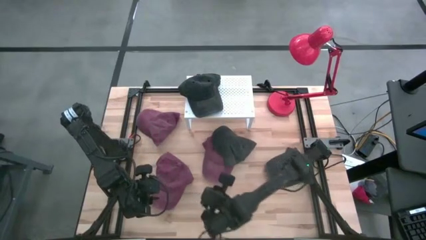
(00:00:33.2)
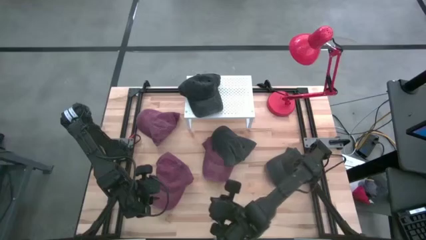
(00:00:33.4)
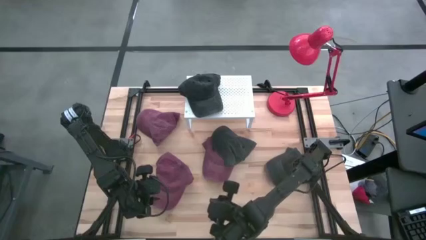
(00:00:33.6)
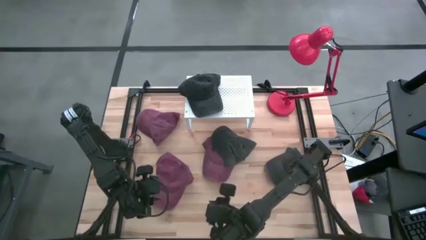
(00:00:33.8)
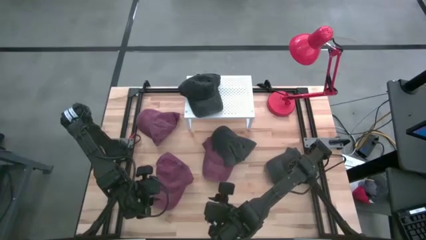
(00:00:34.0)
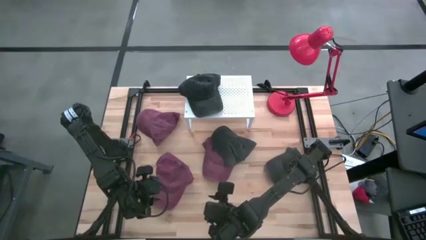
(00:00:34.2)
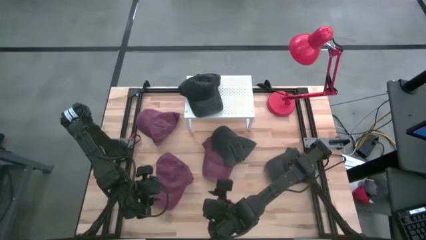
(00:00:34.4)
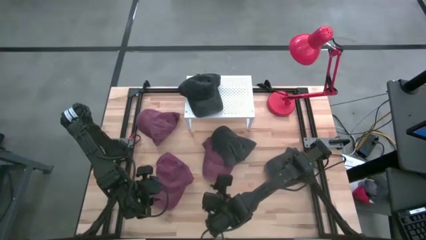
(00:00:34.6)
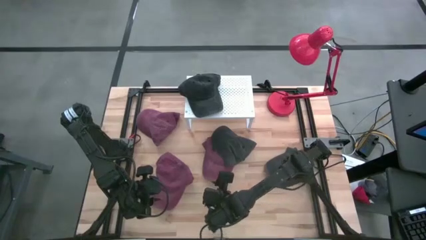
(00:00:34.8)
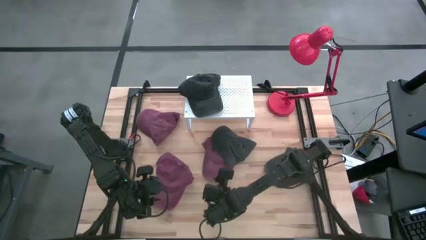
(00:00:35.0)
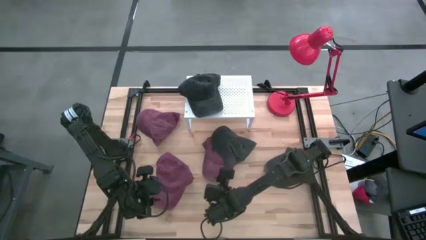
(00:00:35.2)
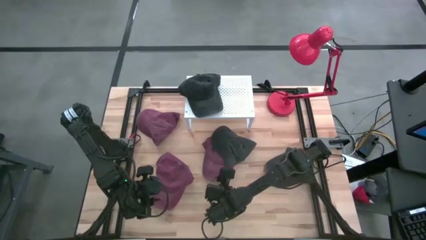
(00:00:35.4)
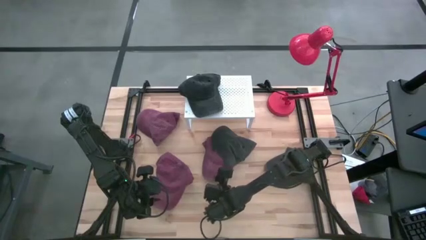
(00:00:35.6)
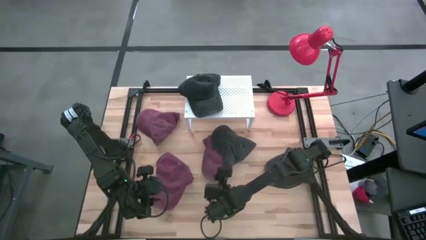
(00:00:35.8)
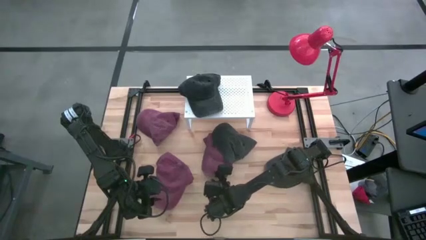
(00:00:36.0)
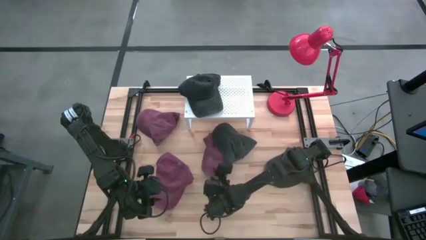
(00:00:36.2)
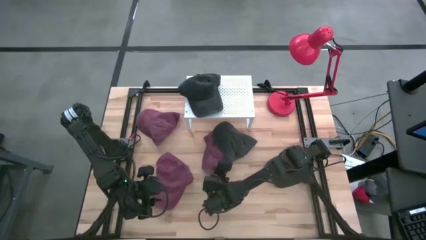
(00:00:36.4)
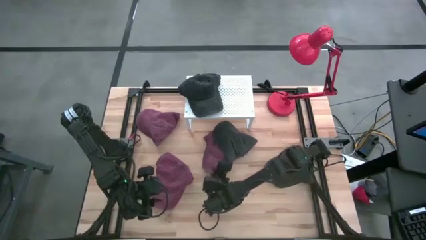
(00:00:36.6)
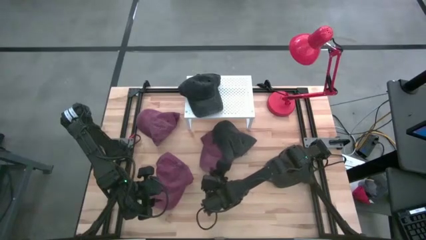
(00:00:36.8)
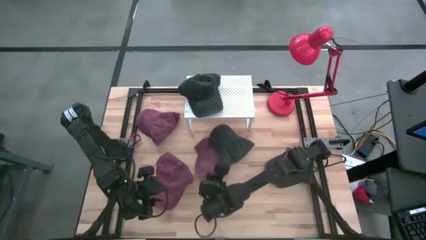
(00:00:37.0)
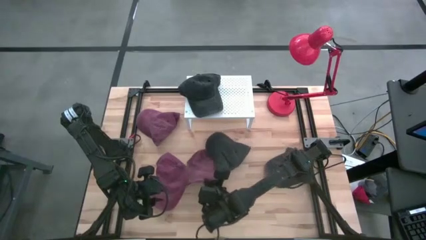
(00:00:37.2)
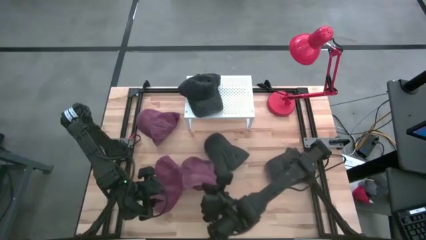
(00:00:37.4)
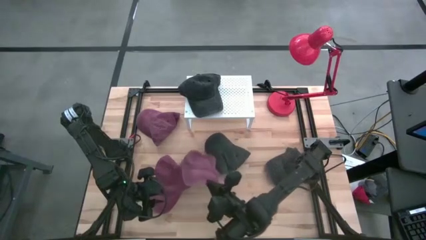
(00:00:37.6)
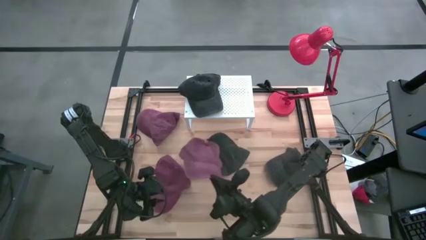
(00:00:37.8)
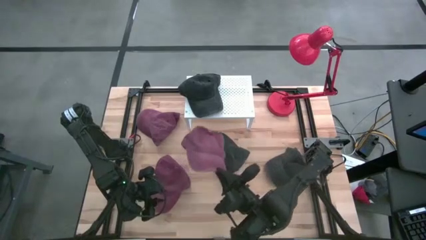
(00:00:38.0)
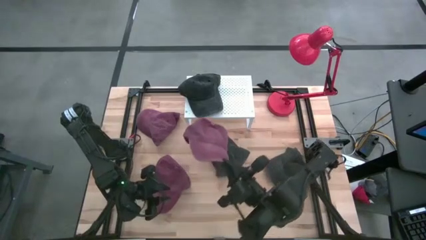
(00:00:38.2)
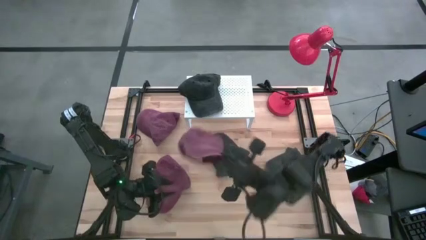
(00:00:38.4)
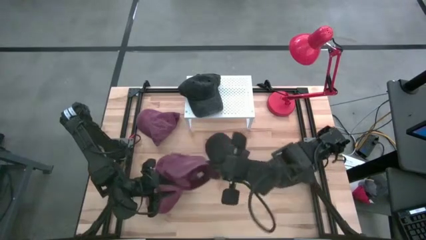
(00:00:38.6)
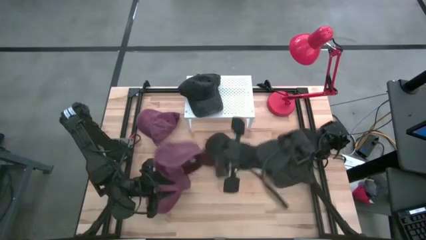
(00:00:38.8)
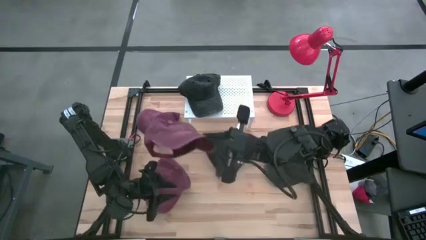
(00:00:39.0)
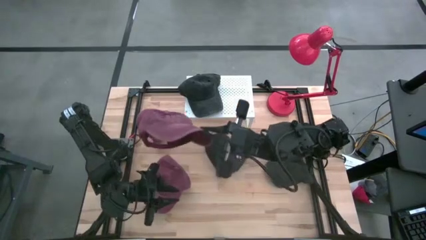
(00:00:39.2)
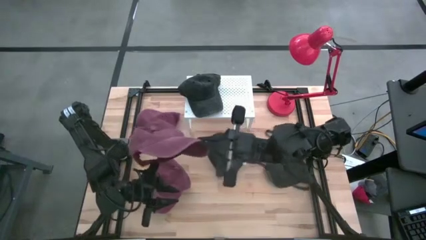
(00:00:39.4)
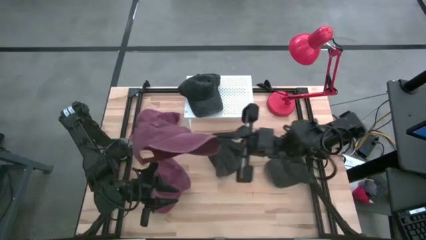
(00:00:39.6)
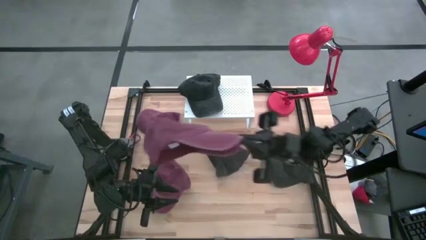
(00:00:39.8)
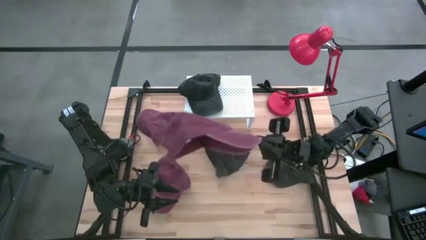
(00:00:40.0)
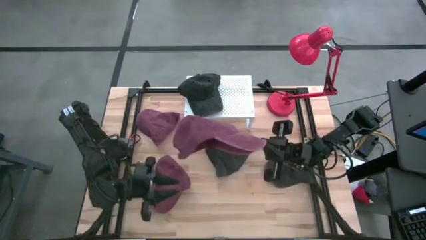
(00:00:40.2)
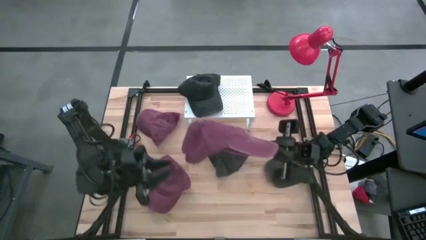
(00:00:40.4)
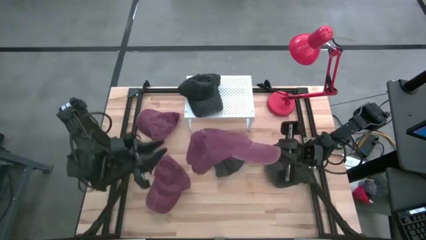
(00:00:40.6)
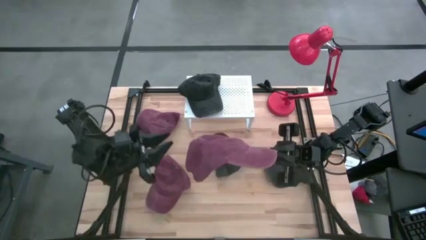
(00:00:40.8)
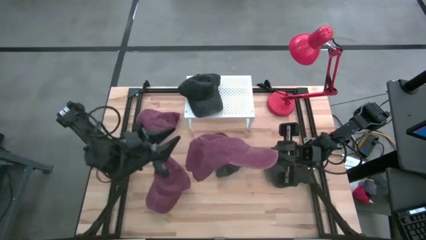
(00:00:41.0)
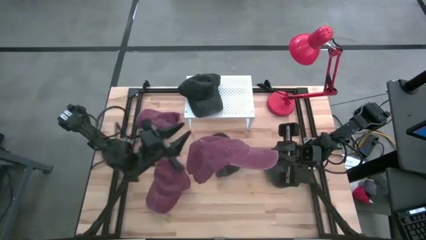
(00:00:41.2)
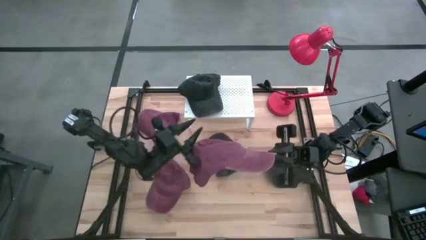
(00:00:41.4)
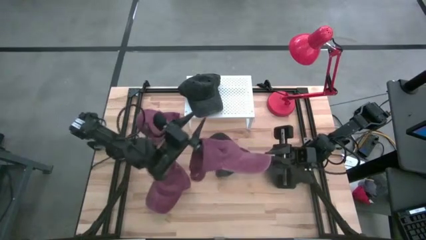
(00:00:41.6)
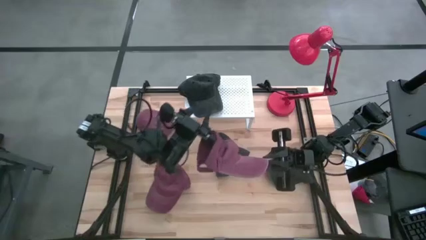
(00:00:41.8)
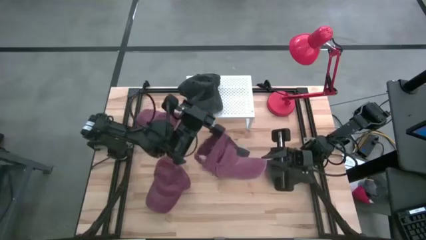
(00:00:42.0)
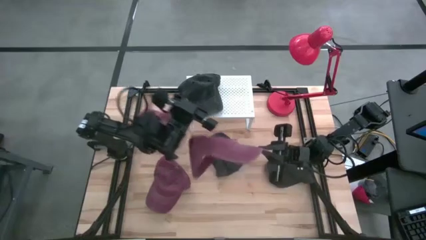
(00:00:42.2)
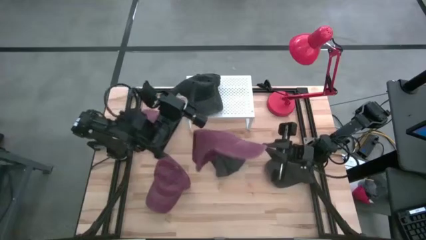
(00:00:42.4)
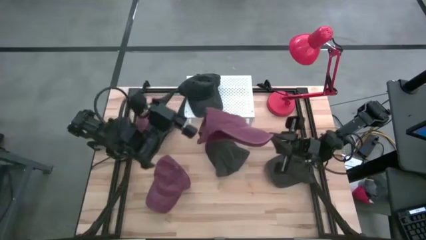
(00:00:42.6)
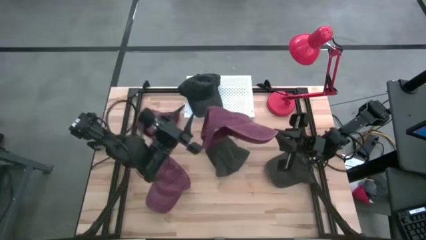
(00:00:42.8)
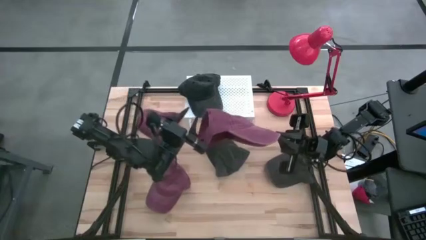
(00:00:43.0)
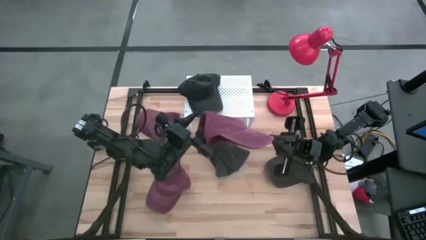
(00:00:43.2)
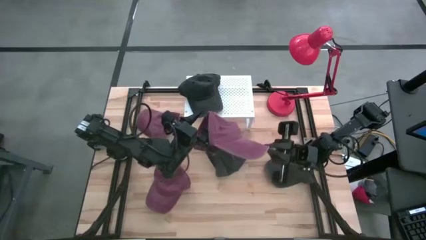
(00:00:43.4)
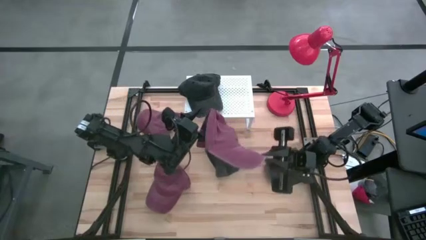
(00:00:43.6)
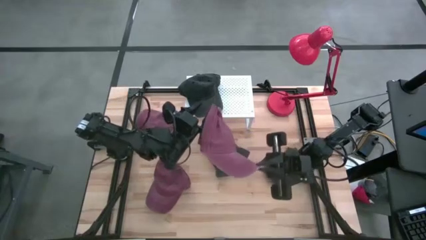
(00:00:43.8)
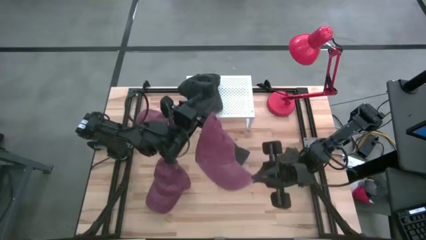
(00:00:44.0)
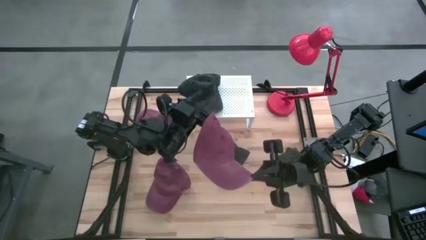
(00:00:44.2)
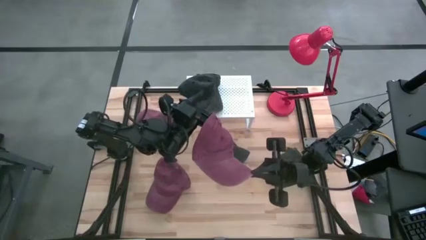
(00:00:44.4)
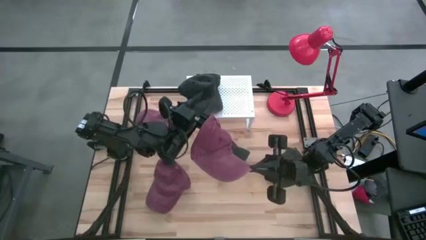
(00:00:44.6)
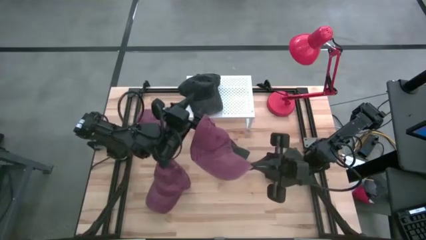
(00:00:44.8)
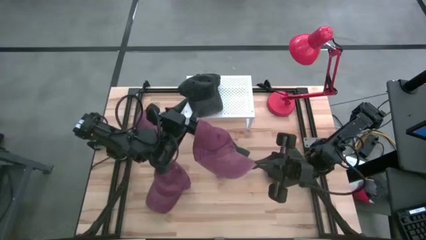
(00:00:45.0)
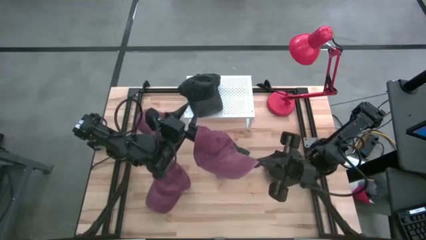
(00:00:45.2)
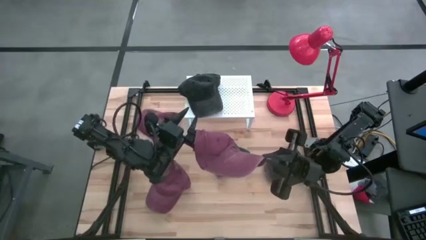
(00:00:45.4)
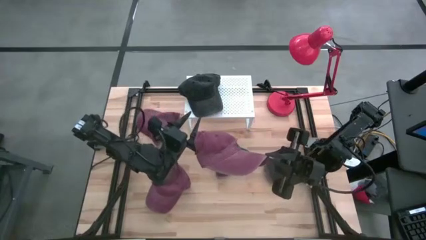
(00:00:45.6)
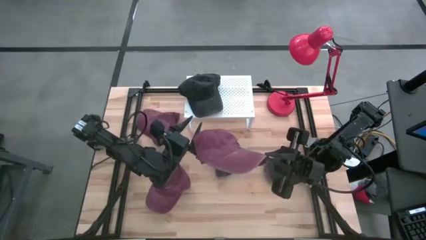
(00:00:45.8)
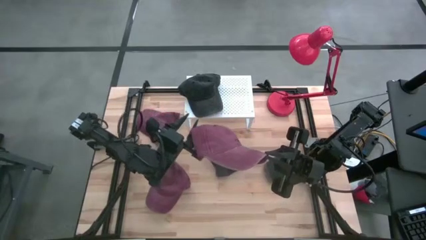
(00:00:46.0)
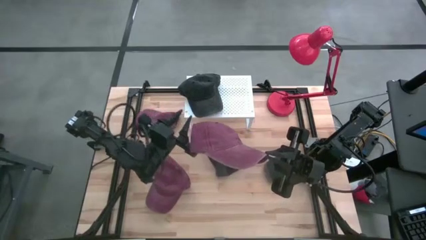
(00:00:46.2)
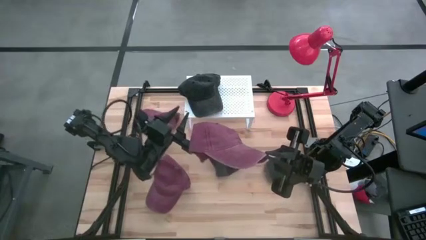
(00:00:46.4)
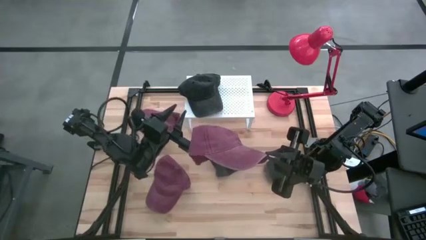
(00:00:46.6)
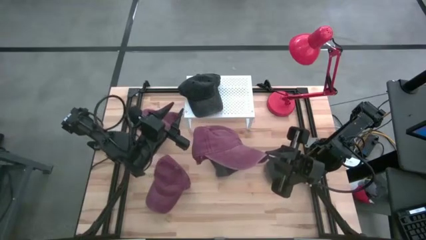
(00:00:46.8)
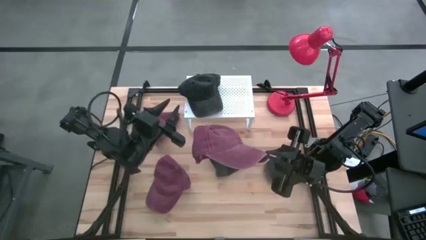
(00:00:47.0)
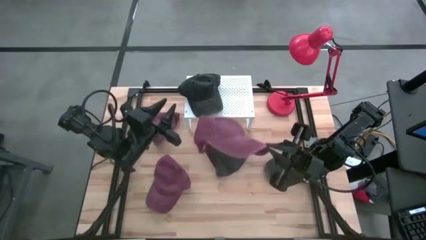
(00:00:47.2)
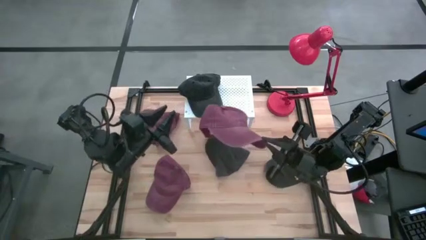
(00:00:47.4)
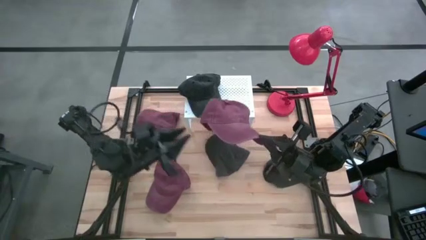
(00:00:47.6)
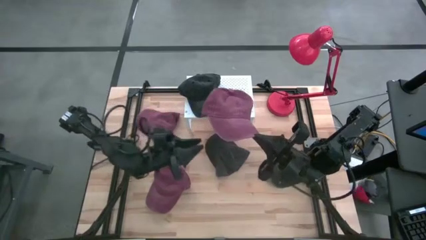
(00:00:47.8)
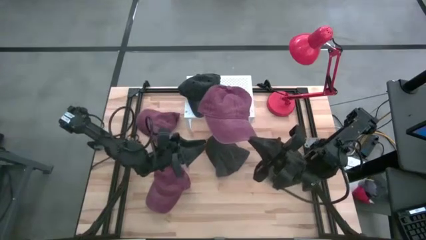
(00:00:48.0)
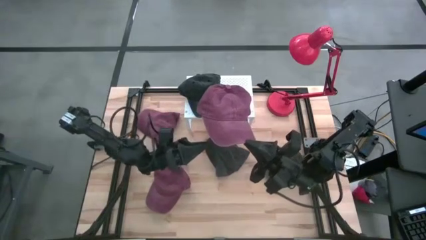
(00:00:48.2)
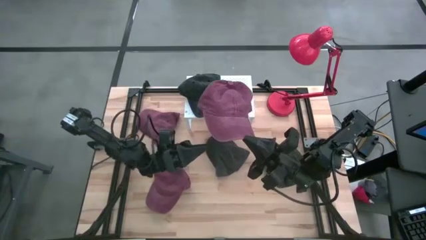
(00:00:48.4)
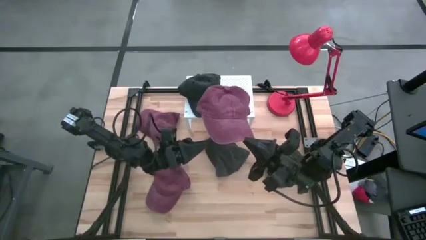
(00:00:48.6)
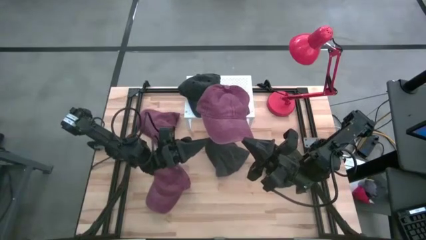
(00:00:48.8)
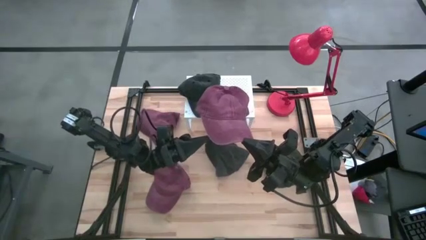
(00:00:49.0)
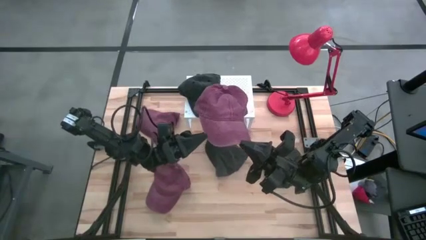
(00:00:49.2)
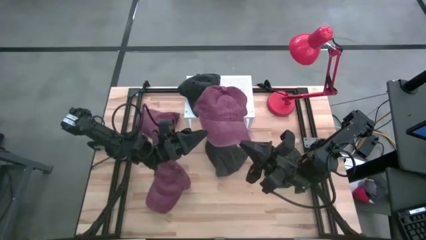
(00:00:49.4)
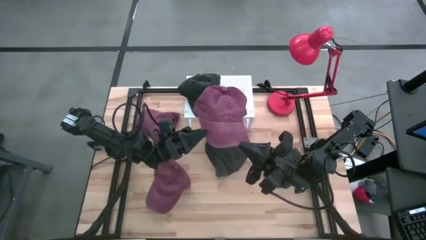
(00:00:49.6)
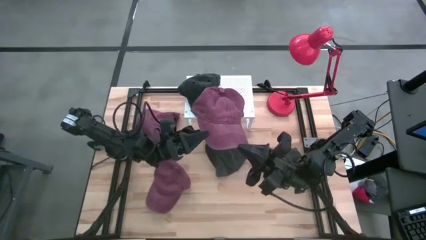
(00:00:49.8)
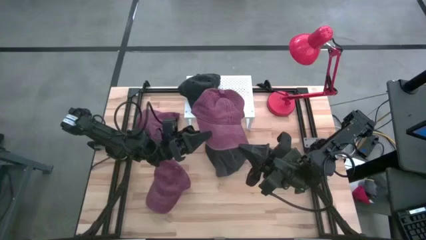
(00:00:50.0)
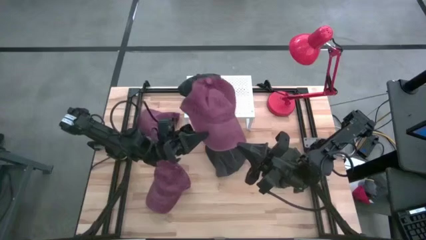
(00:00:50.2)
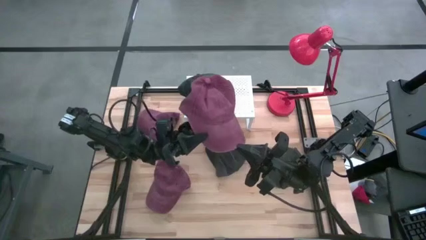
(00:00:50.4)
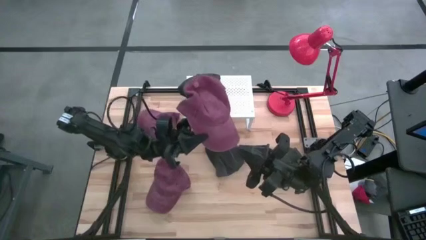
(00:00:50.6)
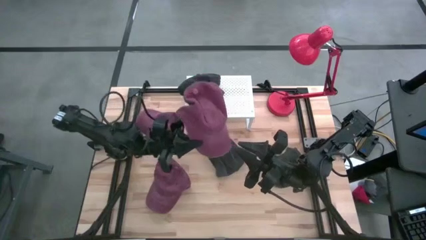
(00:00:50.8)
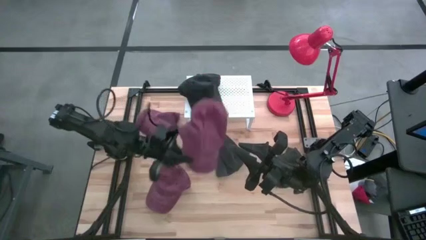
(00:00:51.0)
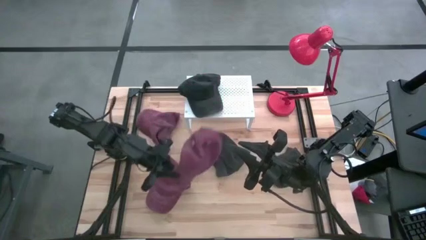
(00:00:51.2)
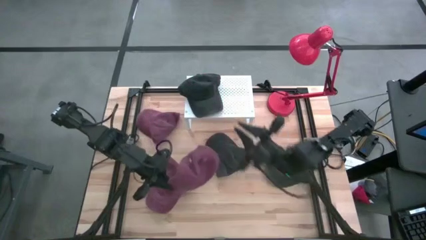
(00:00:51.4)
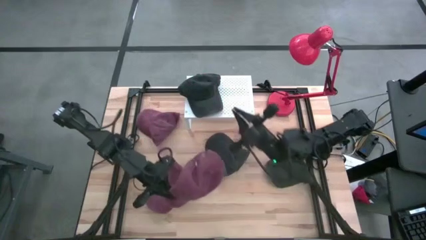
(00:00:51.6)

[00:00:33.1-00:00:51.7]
Task: Pick & Place hat
Put the middle red cap on the shelf
